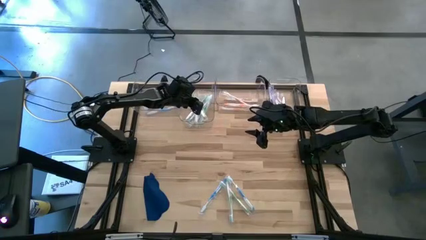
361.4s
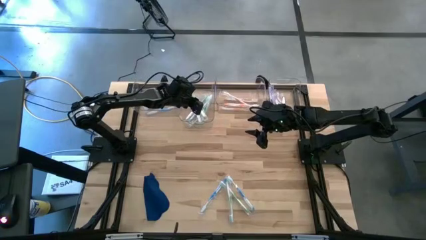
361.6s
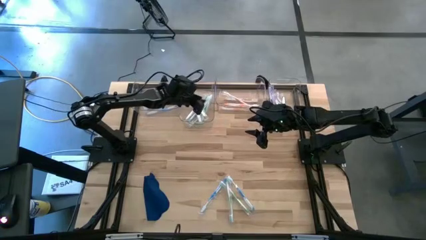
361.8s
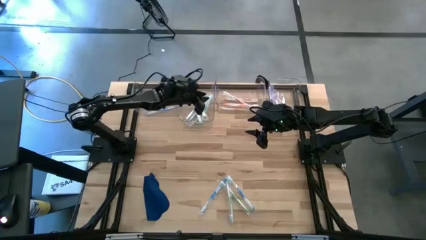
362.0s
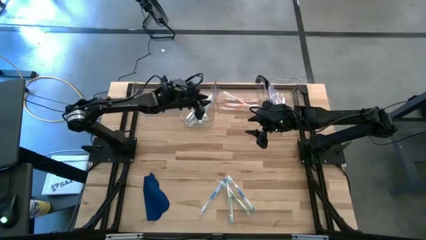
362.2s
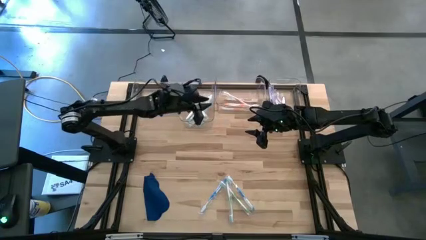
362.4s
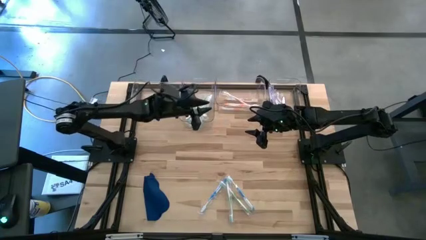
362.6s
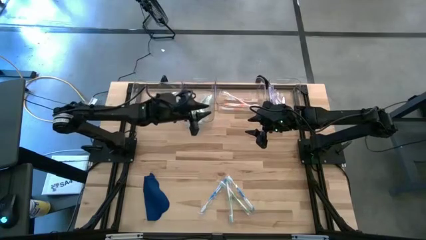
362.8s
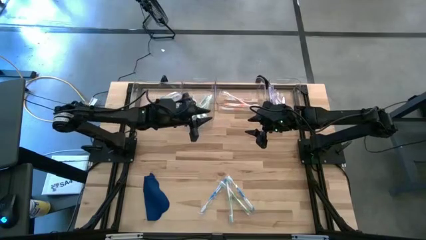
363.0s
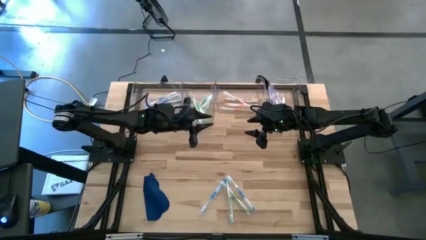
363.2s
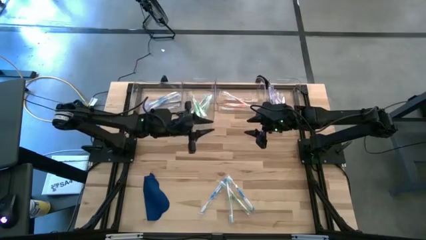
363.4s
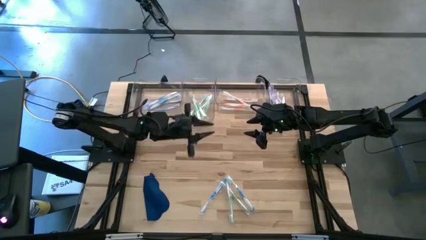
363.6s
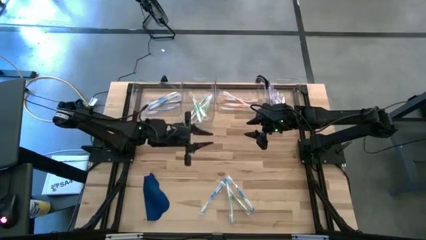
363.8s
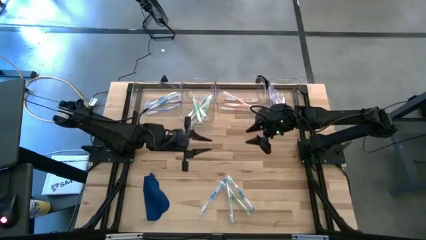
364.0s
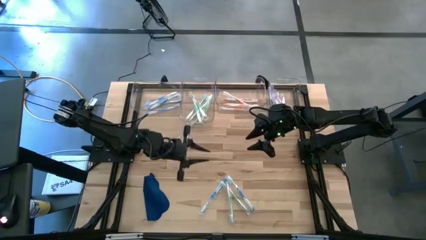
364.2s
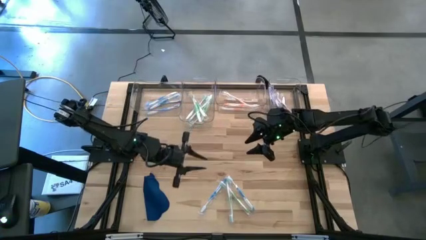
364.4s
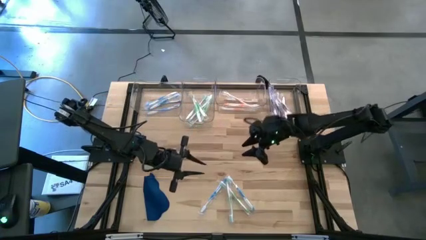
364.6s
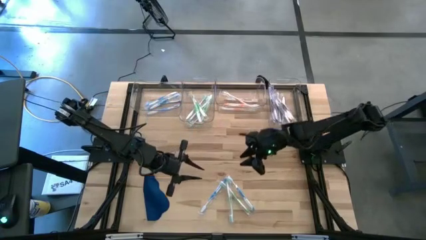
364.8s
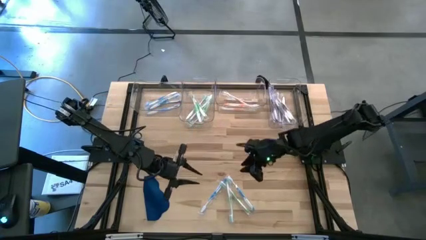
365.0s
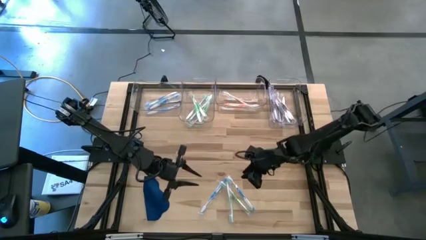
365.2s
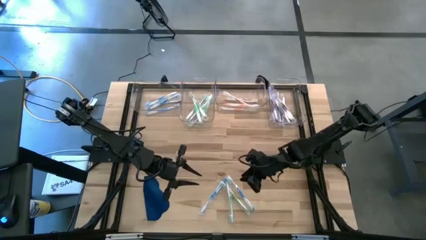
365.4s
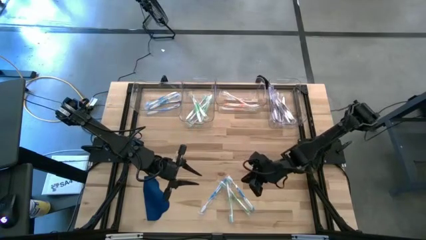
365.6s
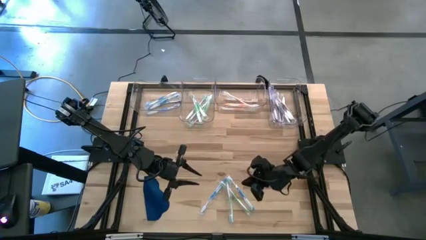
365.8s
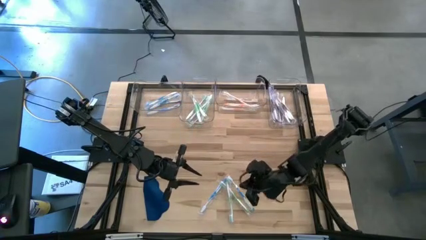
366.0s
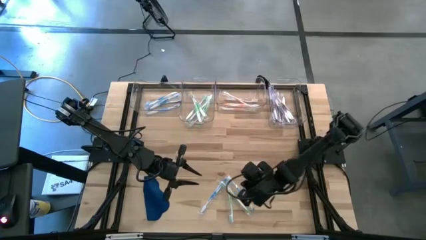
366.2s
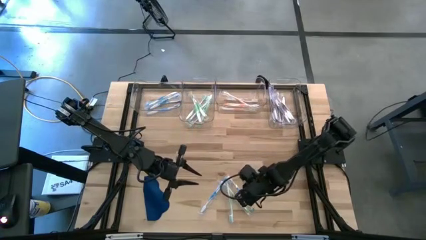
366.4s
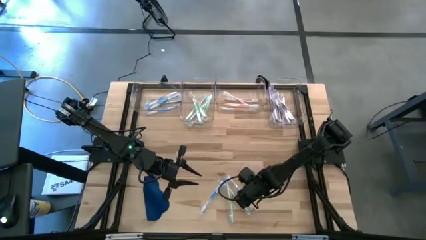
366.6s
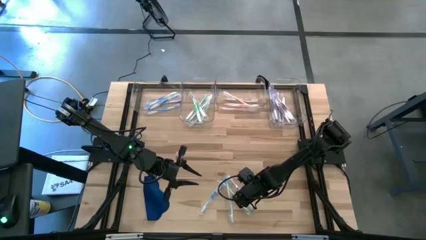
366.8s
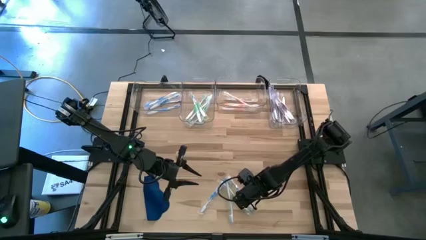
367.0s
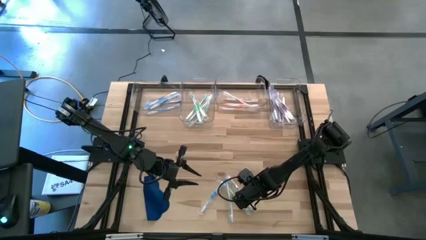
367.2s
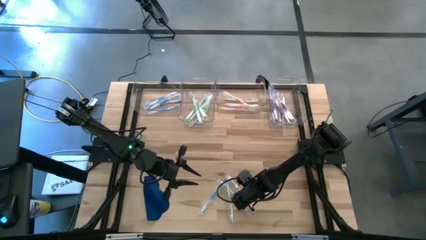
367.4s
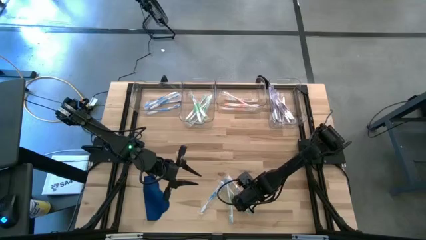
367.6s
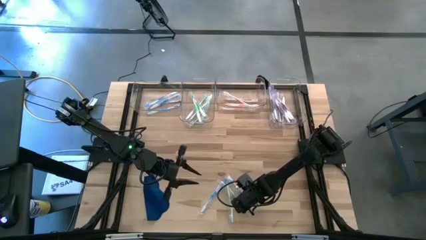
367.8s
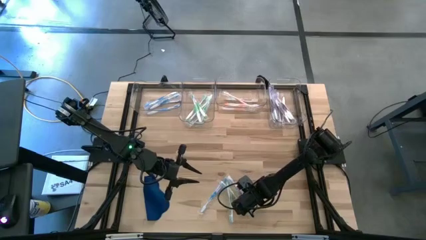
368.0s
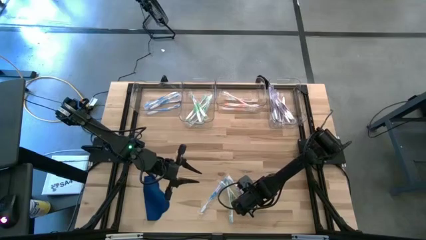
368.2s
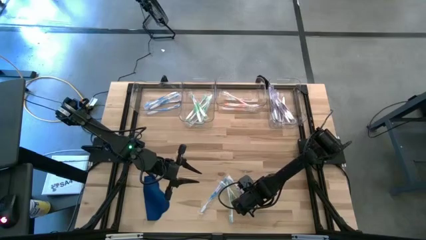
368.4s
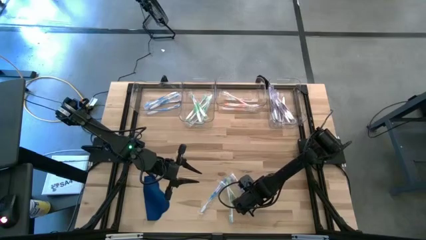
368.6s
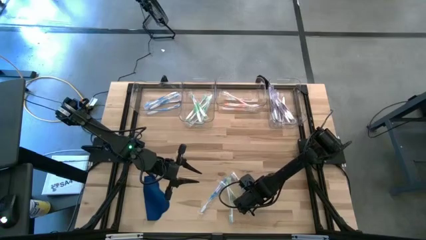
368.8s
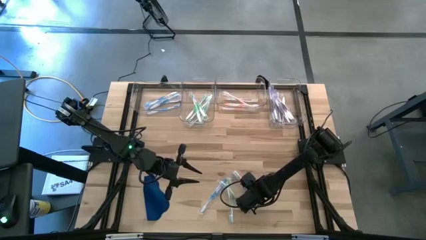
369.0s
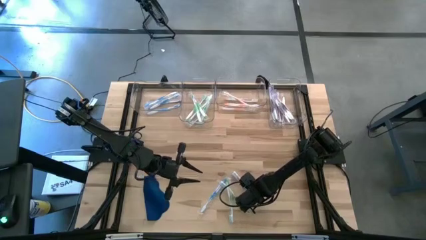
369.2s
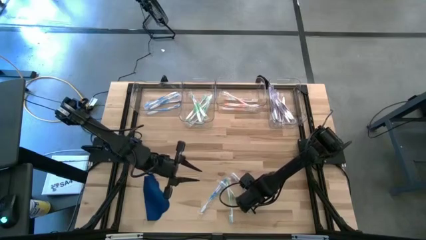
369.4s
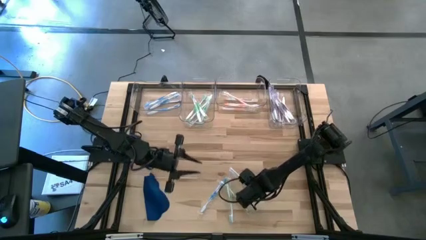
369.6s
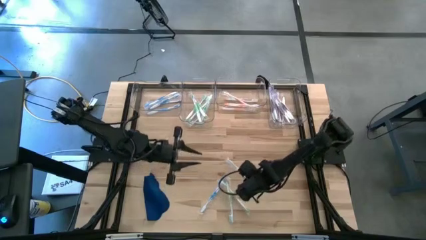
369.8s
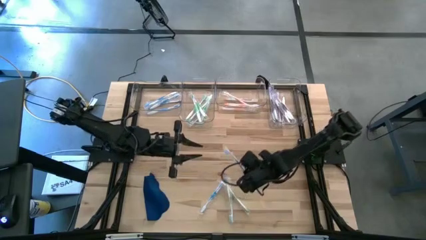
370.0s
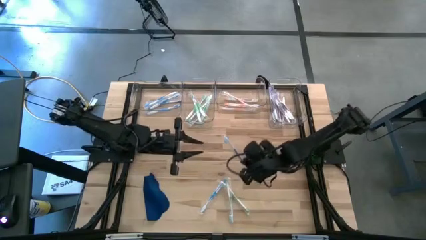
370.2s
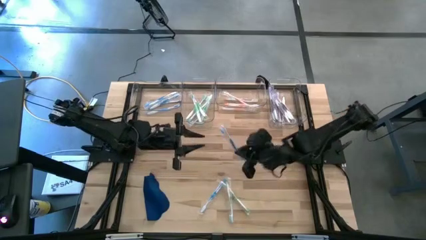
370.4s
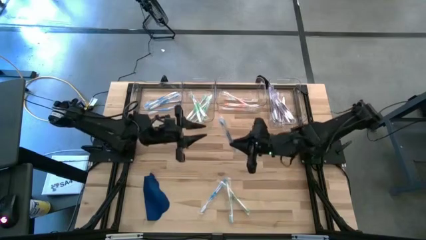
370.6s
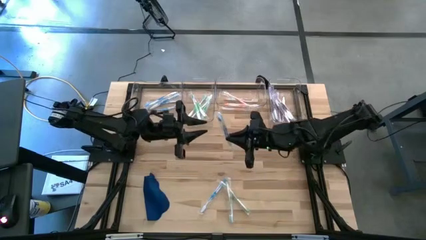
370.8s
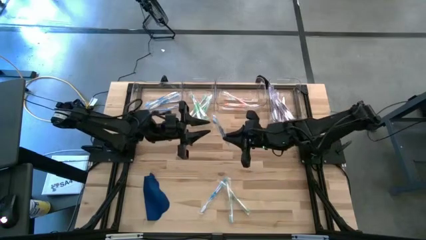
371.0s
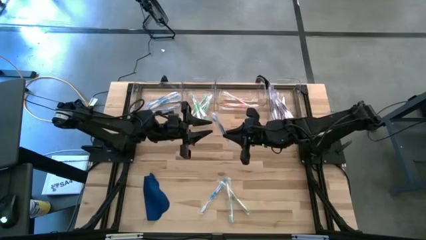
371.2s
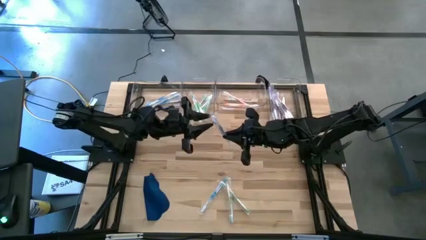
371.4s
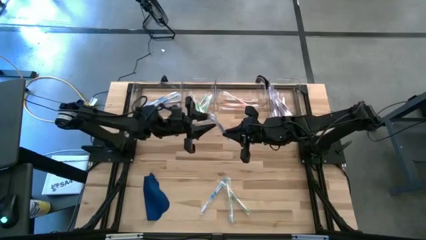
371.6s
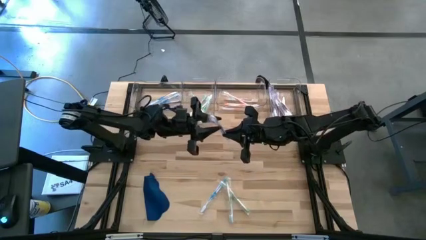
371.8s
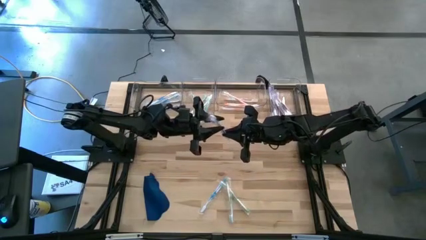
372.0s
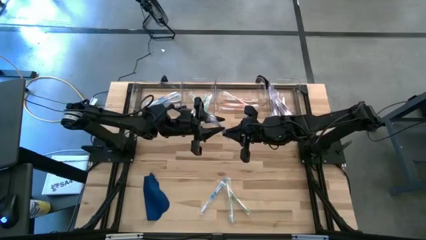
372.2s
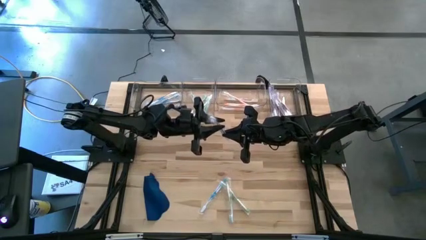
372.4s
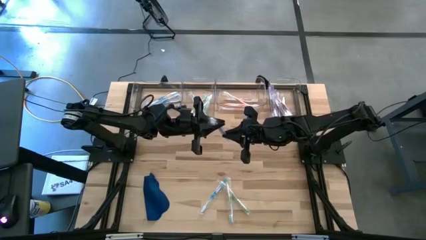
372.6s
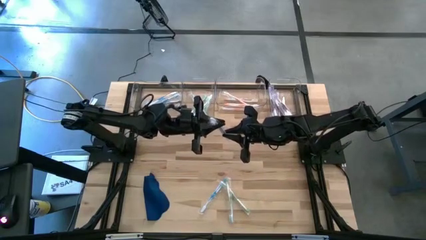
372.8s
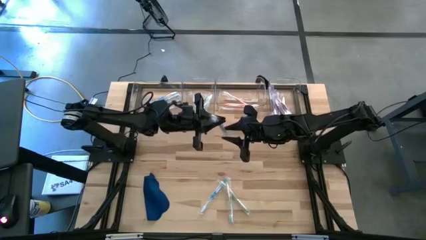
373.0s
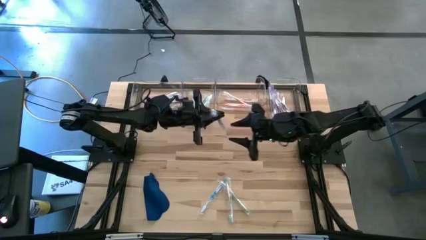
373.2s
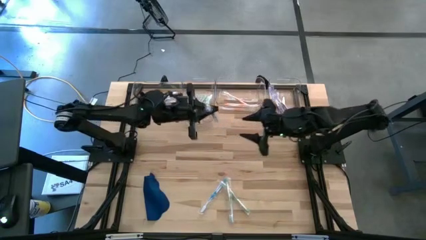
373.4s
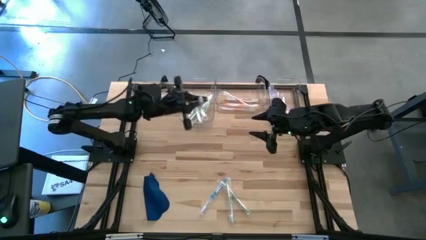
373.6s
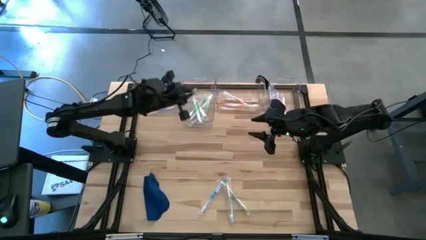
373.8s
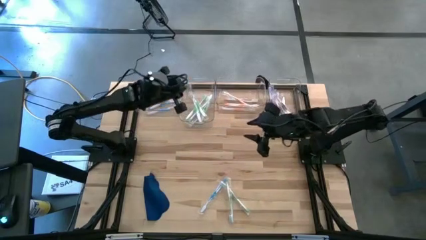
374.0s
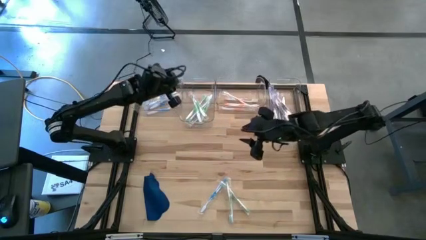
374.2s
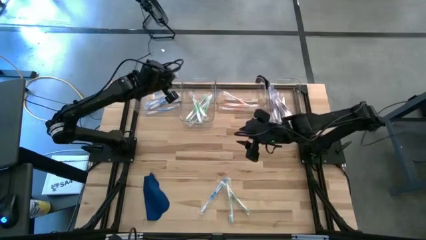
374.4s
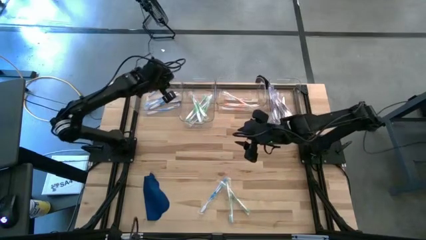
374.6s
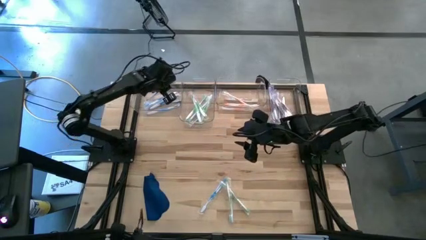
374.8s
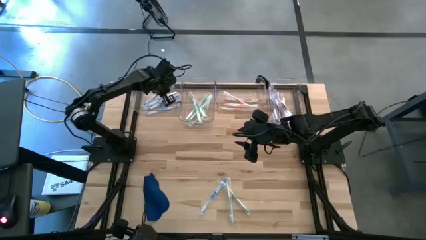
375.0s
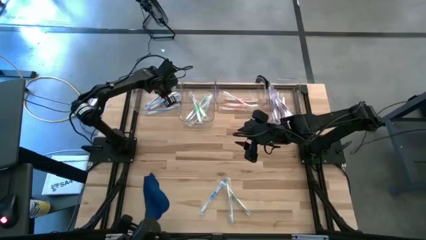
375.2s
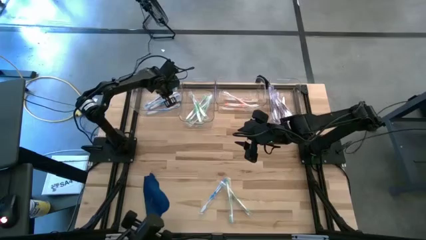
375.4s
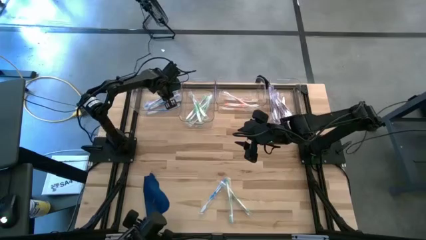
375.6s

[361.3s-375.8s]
Task: Pick & Place Toothbrushes
Put the blue toothbrush into the left transparent bin

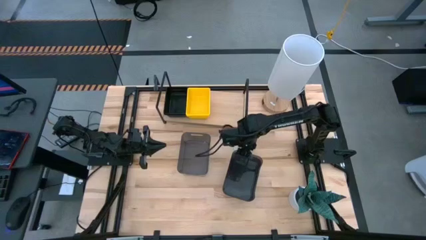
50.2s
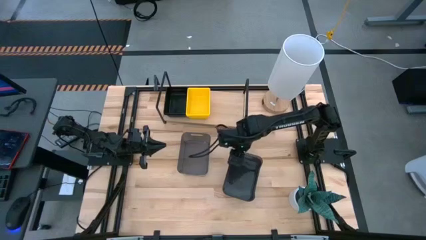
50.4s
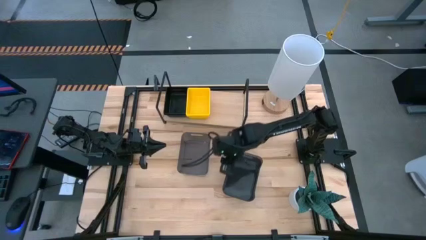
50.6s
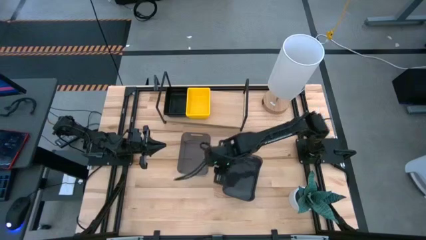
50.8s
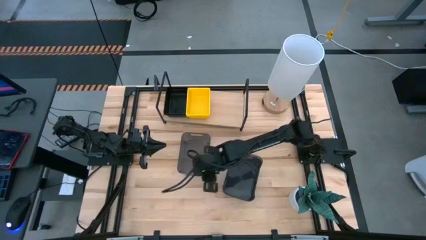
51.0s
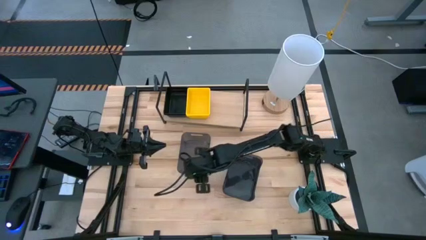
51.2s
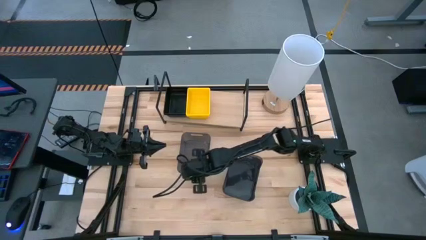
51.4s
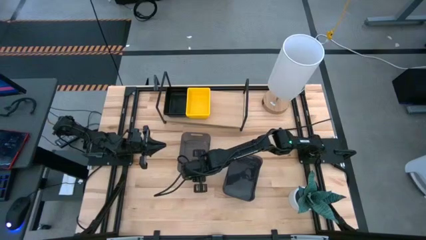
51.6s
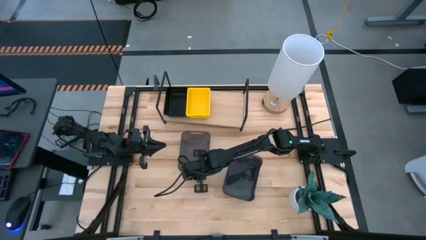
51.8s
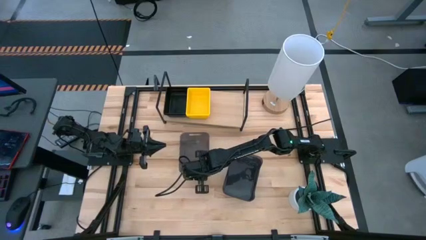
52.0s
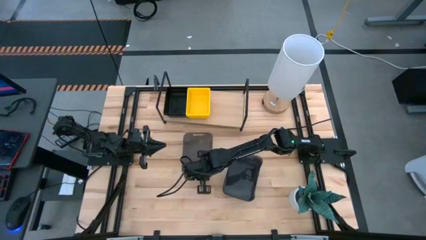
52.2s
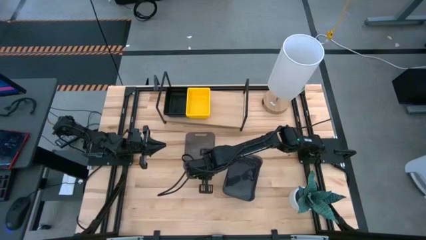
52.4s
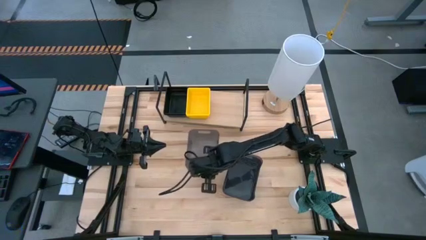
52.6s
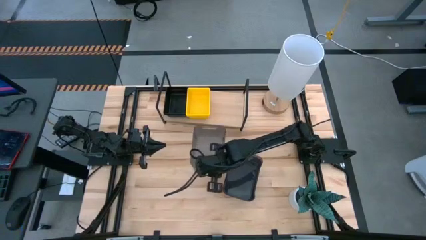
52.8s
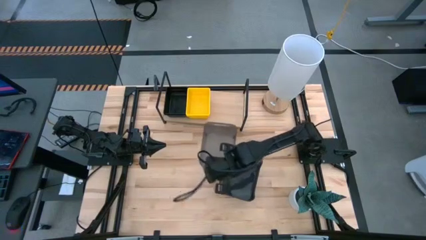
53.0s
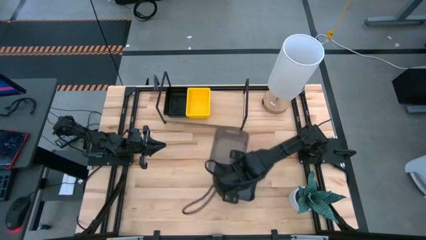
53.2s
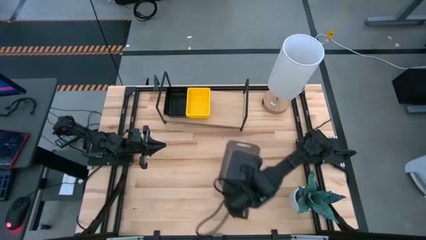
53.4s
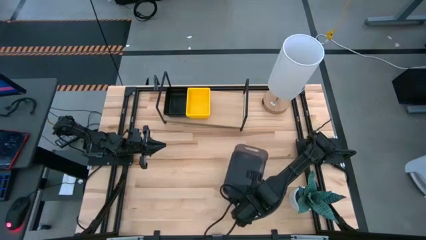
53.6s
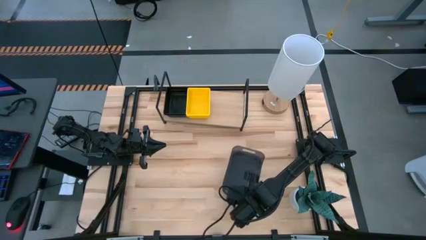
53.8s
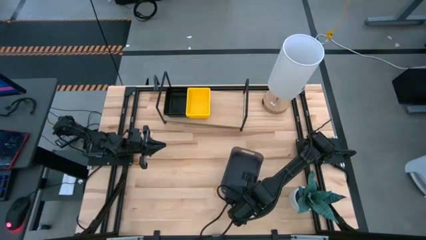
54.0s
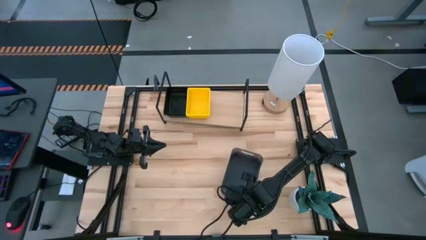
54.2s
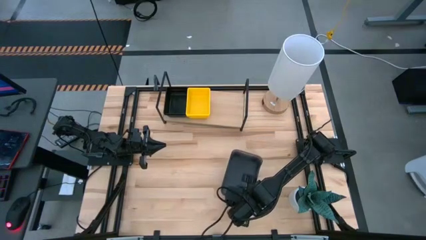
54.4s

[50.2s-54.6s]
Task: Stack baskets on shelf by color
Stack the left black bin on top of the right black bin
